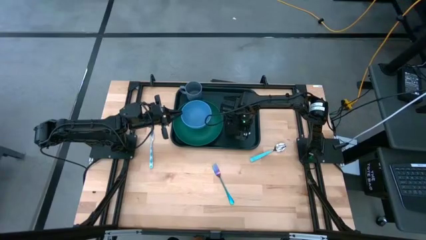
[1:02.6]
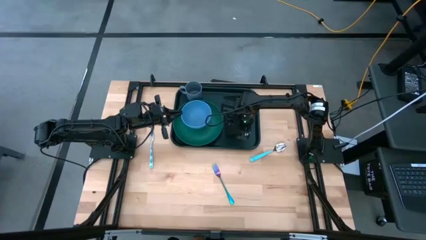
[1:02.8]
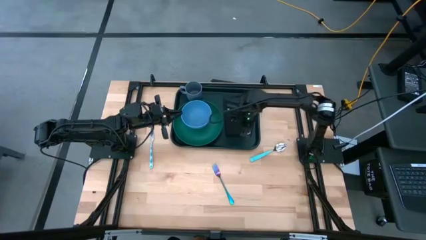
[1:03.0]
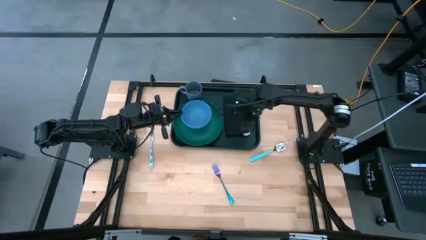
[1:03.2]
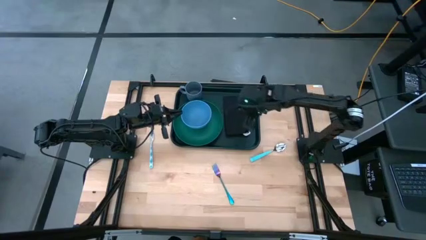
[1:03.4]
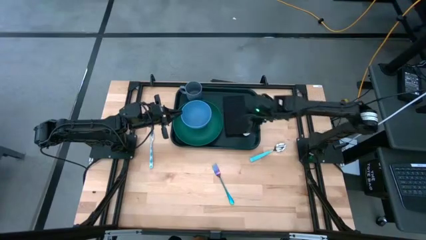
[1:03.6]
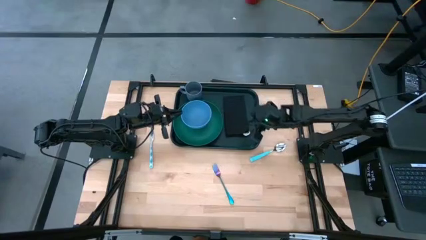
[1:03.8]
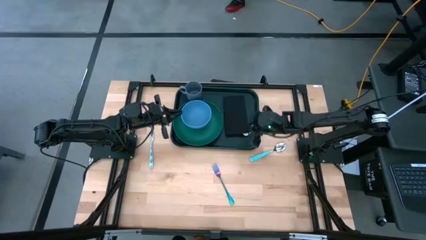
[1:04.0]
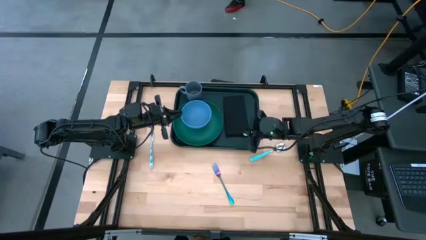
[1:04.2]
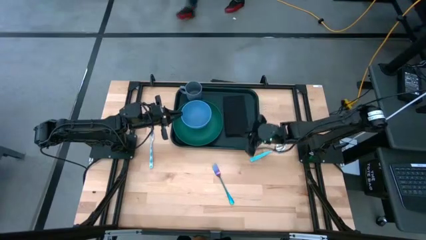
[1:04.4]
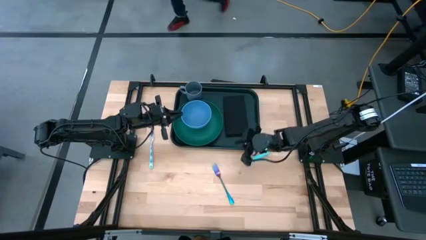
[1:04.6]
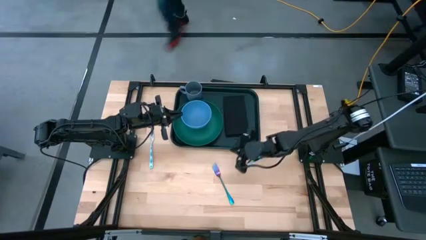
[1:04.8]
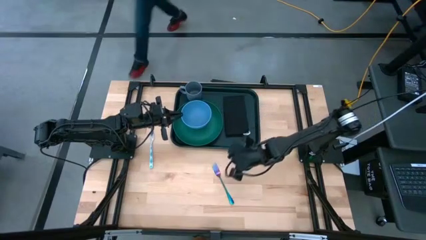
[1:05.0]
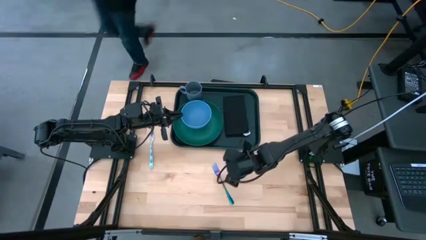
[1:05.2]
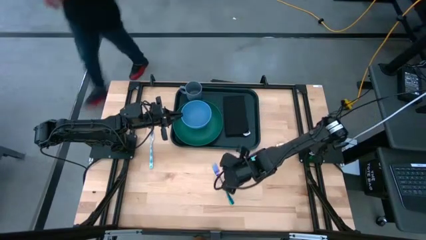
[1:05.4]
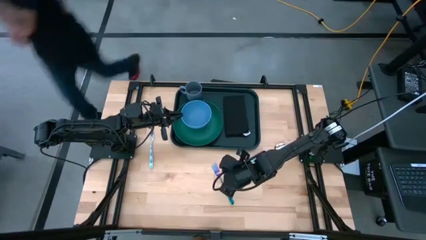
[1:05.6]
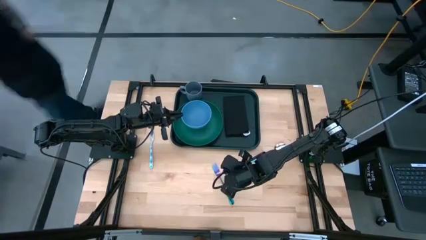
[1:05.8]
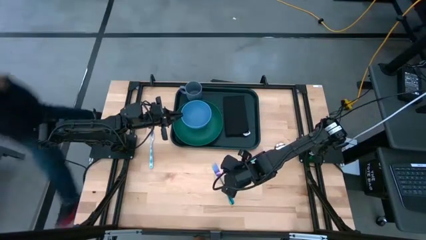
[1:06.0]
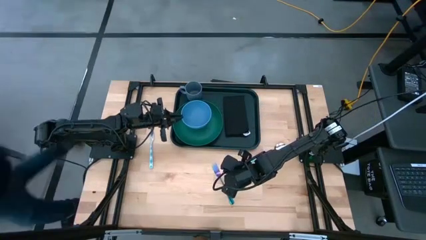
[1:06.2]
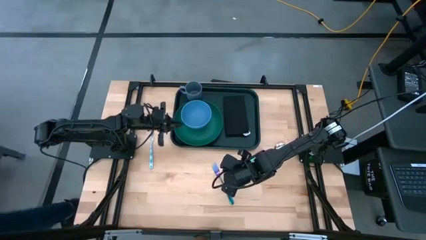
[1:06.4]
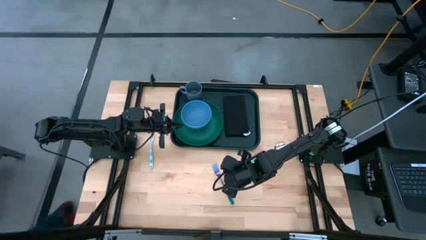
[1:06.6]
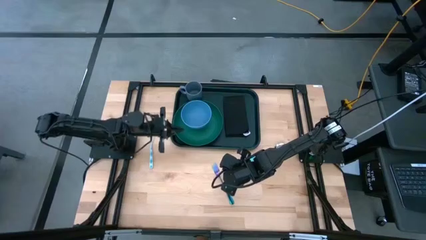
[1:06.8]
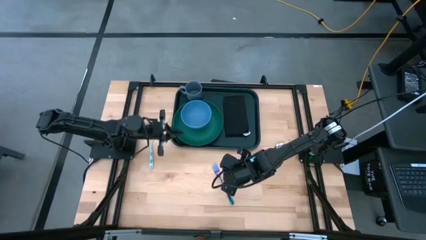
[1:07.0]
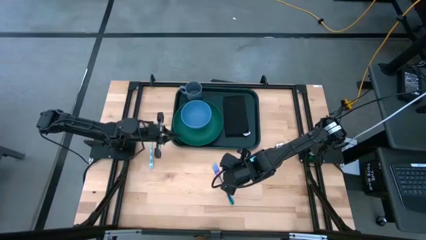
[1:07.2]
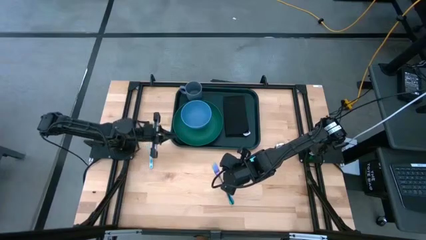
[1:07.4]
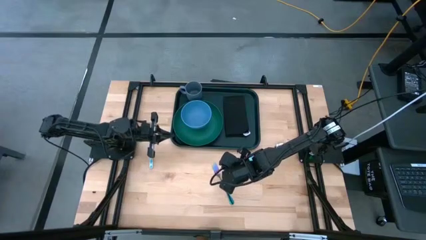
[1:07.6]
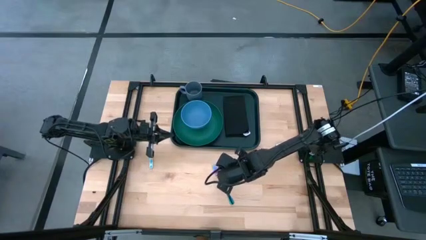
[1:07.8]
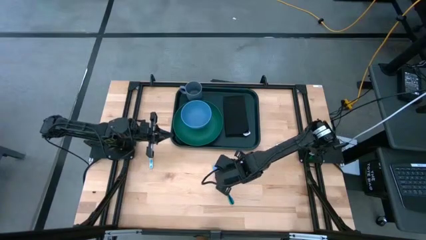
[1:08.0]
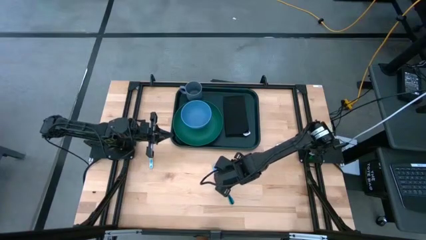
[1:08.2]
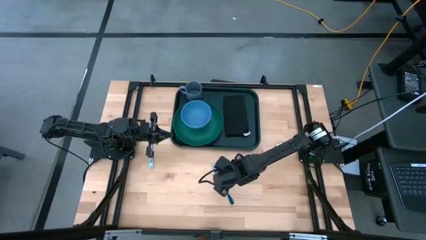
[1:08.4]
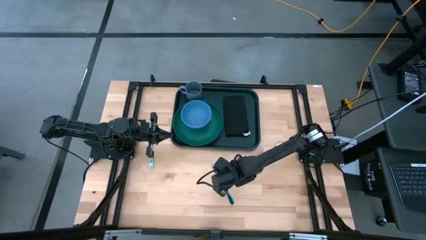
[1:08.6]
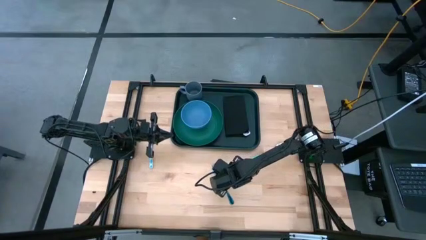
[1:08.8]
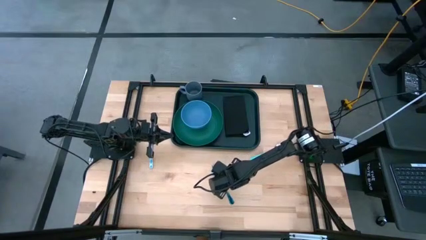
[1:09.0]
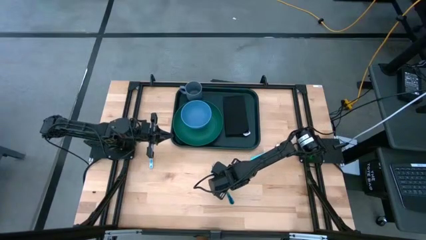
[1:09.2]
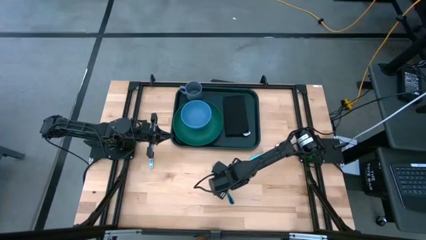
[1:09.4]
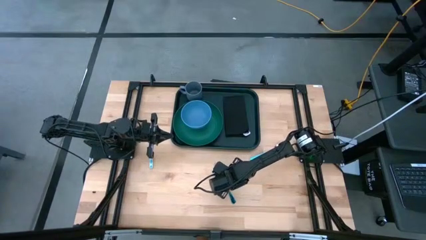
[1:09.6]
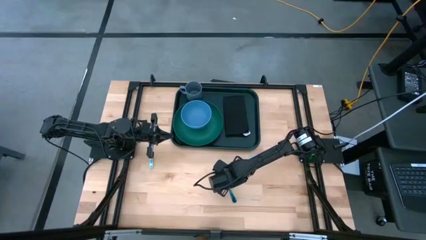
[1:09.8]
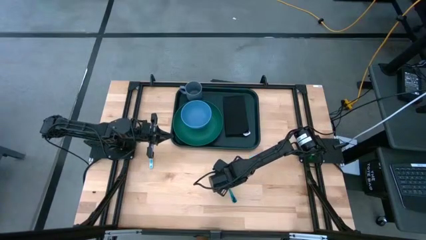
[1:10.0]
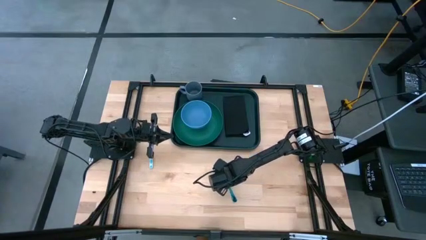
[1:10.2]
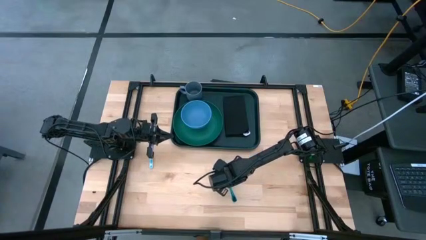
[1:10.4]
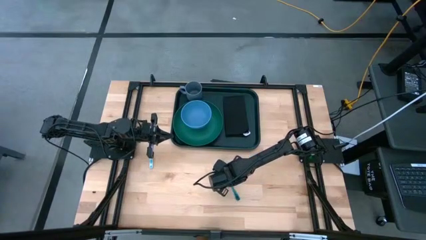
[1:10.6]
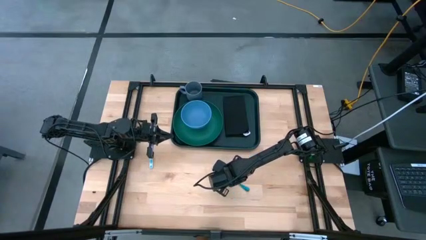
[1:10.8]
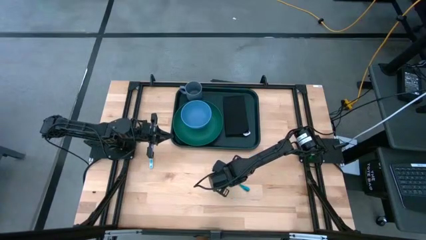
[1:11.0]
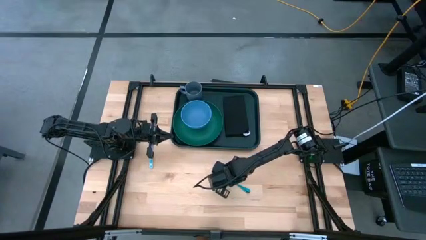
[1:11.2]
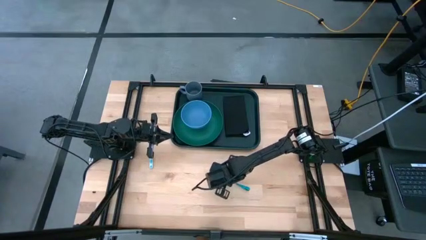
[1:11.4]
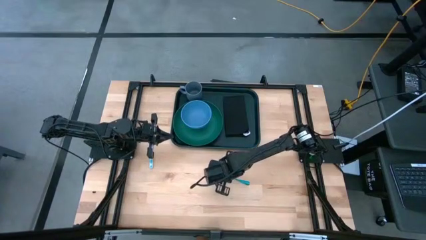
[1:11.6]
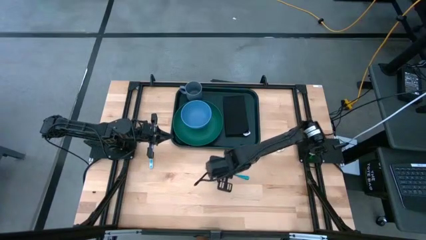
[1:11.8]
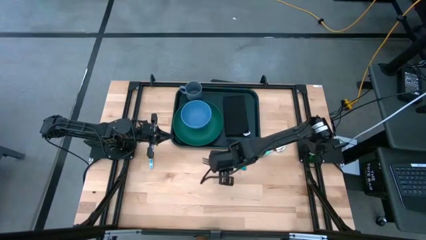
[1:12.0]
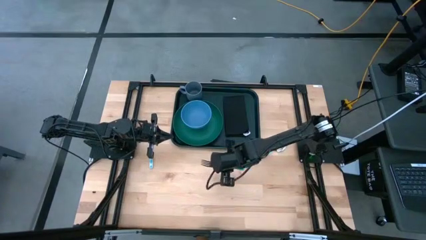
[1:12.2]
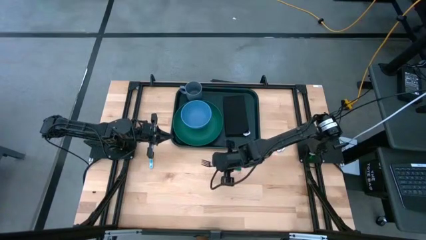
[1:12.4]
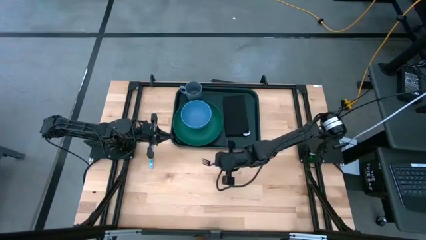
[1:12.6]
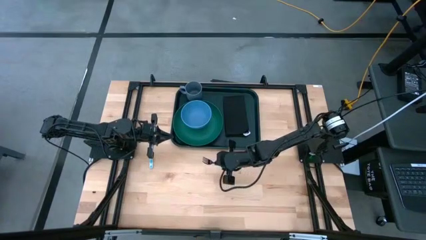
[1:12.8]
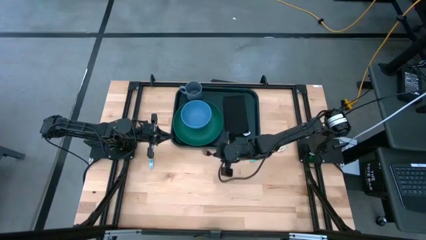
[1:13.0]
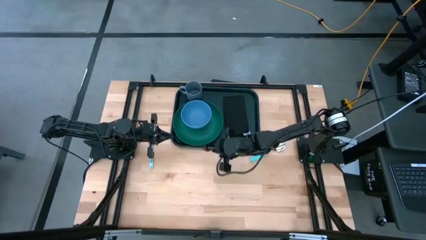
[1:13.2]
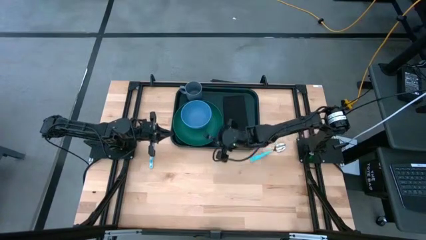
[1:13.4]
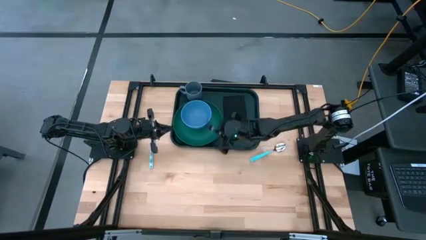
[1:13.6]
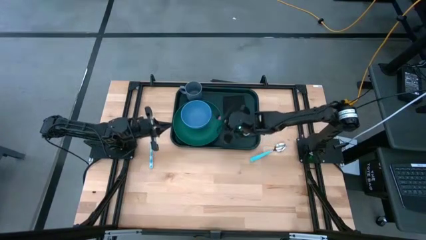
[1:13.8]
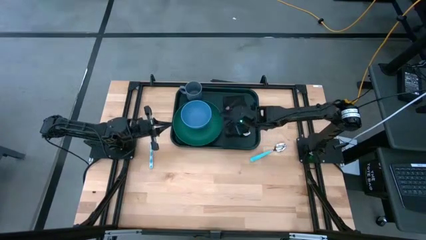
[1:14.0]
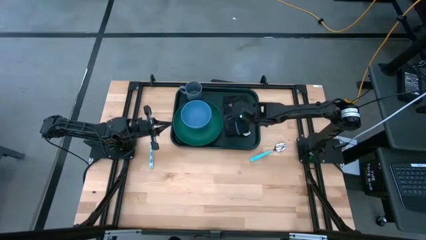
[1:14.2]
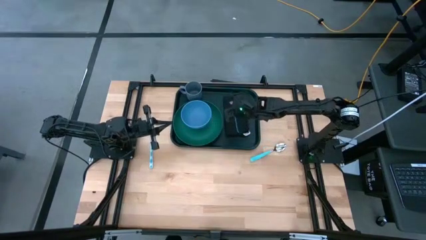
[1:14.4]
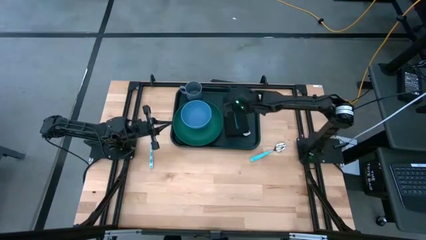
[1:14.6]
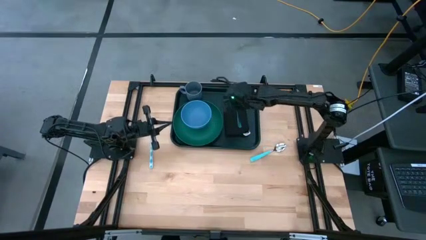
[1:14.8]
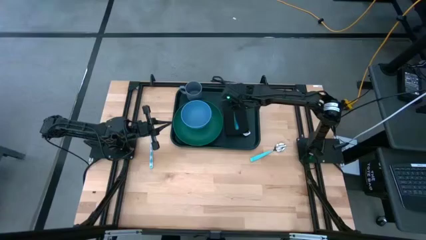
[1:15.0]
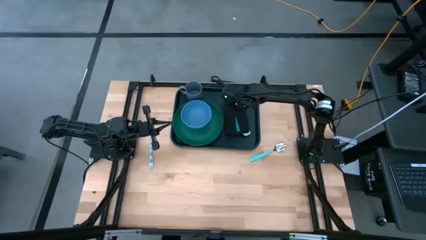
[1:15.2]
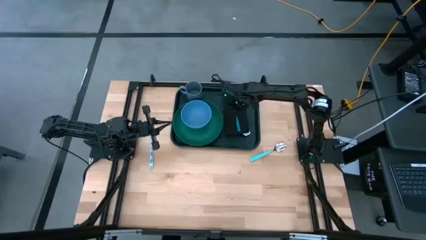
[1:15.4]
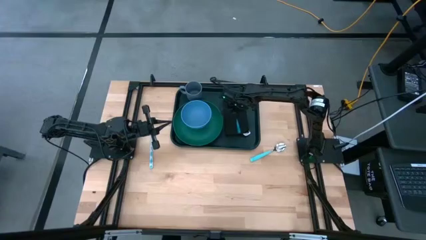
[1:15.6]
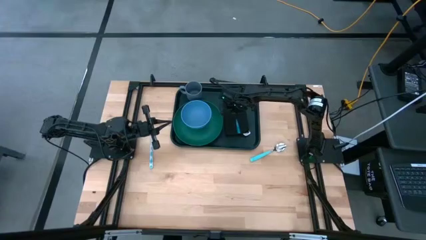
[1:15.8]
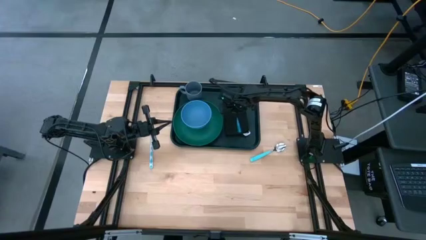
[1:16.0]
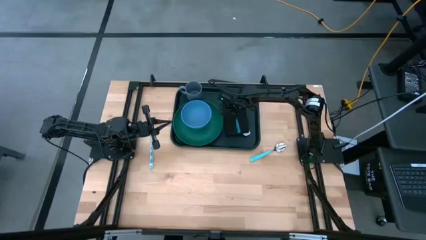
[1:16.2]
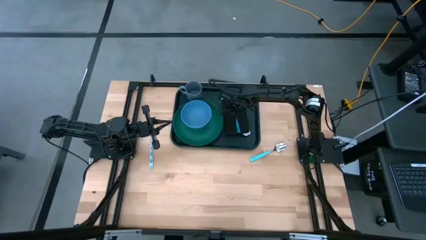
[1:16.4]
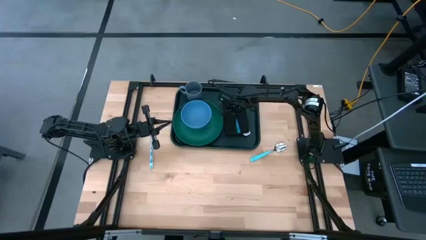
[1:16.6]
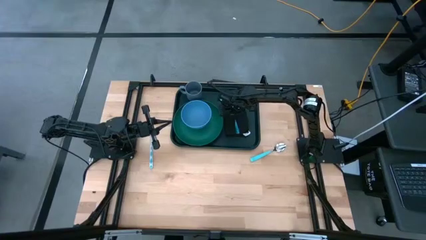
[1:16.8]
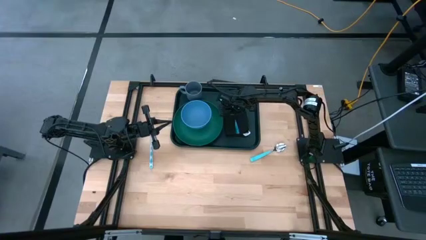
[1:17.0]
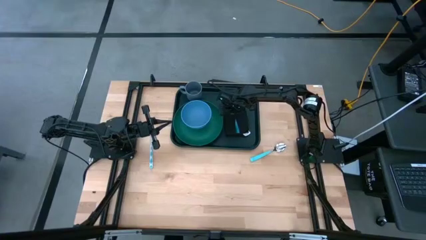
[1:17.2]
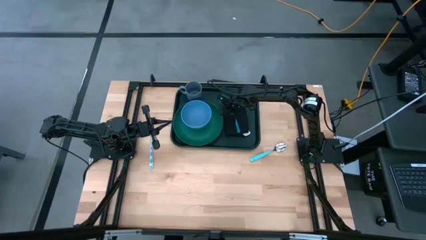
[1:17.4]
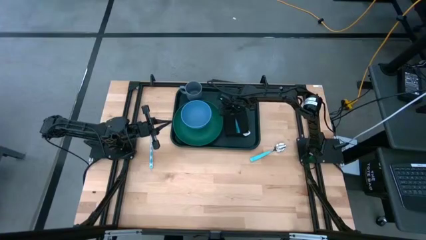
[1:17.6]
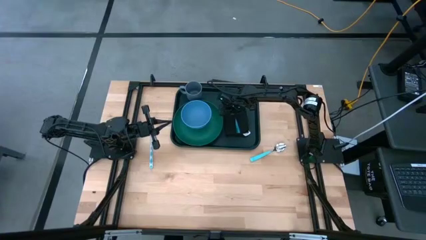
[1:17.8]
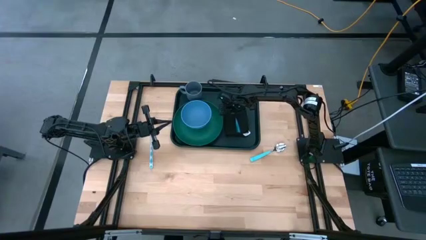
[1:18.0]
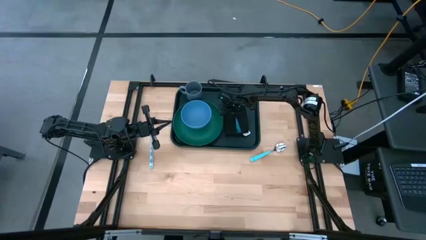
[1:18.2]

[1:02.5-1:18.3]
Task: Set up tray
Put the purple fork on top of the black napkin

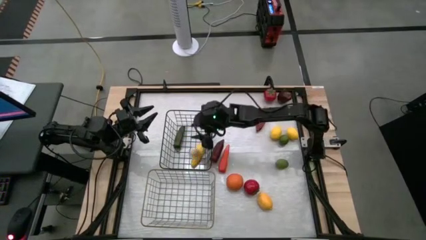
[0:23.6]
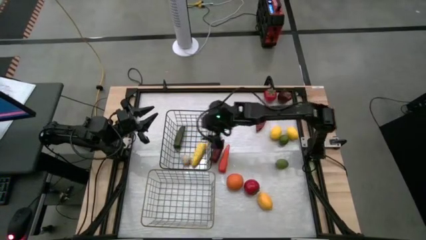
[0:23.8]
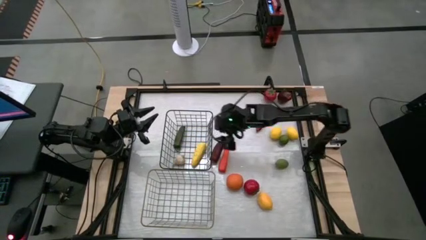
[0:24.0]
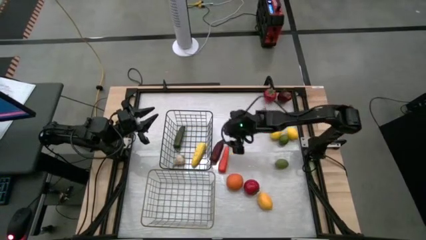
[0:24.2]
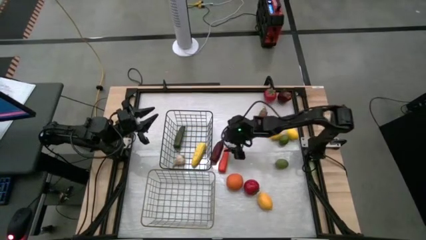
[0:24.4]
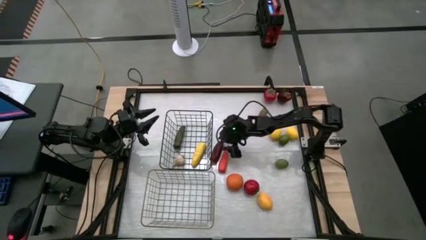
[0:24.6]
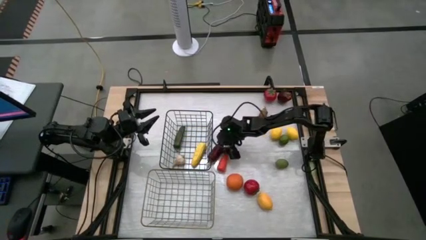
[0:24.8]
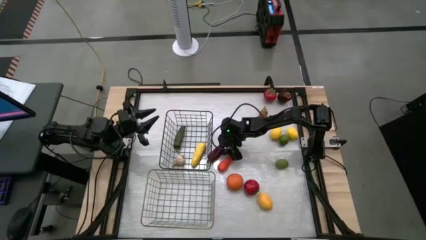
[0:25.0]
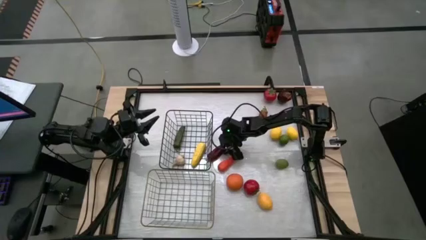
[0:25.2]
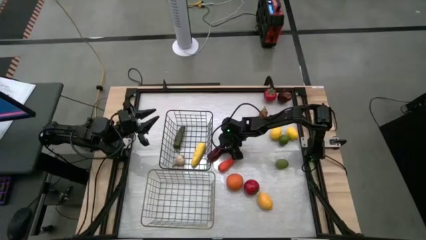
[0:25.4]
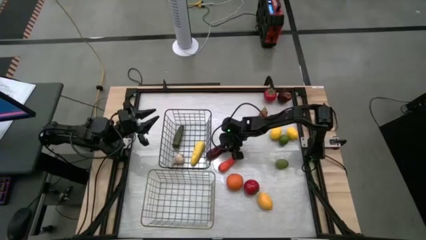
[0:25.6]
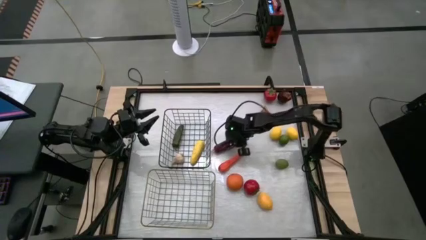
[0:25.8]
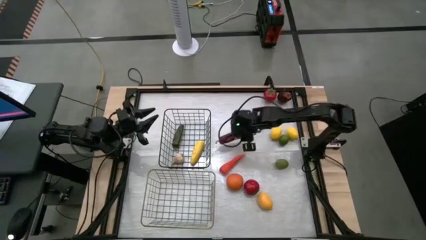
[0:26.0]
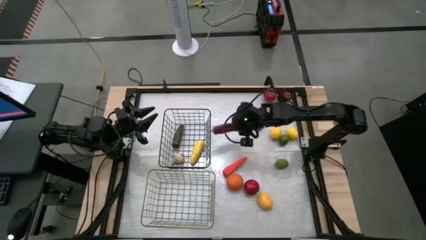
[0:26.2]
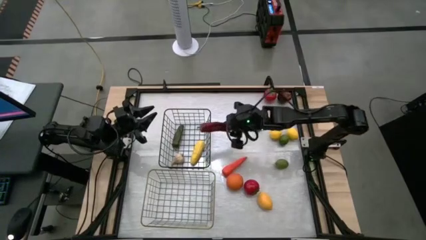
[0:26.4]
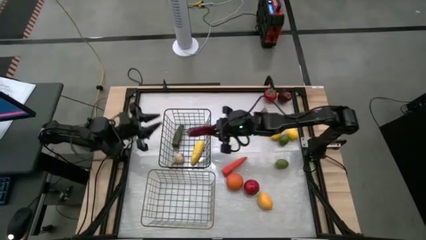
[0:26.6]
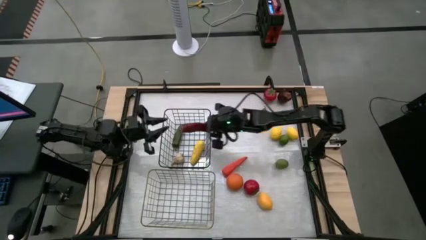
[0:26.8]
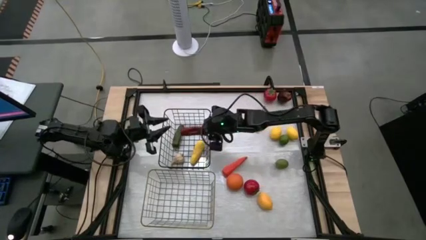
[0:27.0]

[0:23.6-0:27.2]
Task: Sort produce into baskets
Put the left red pepper into the black wire basket
